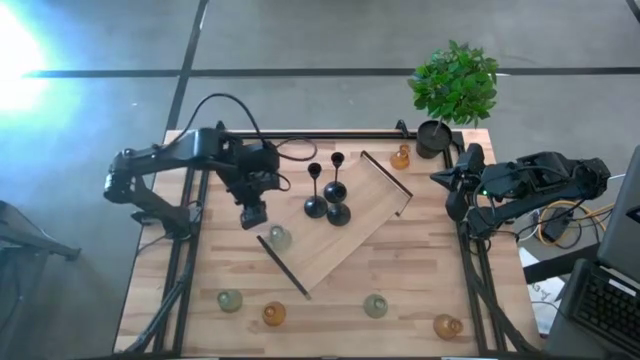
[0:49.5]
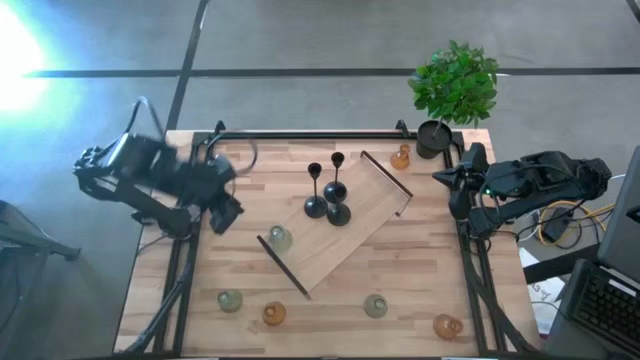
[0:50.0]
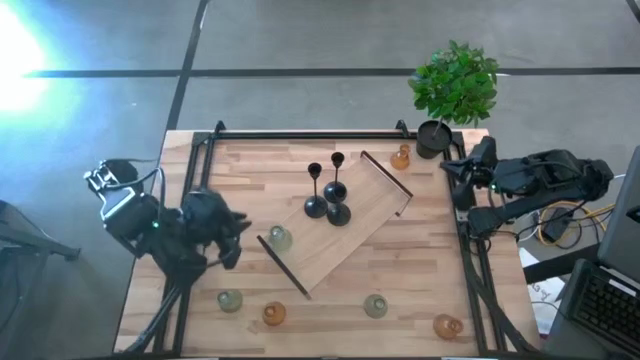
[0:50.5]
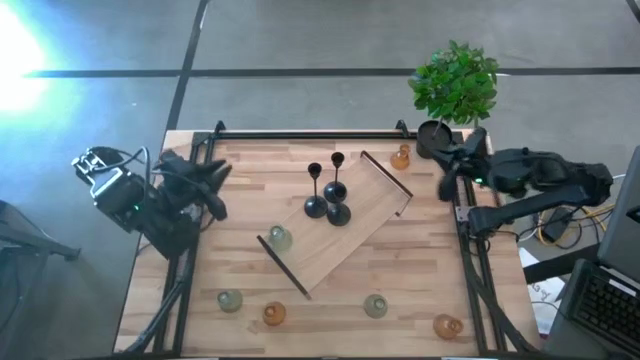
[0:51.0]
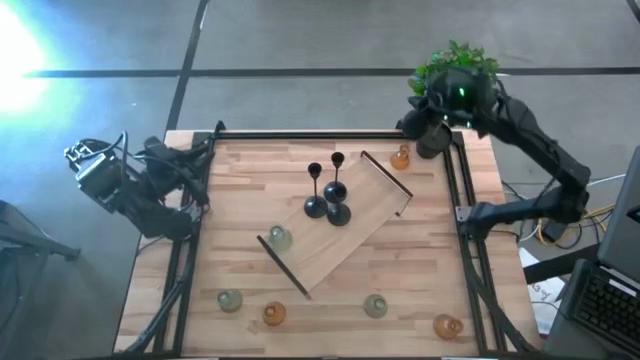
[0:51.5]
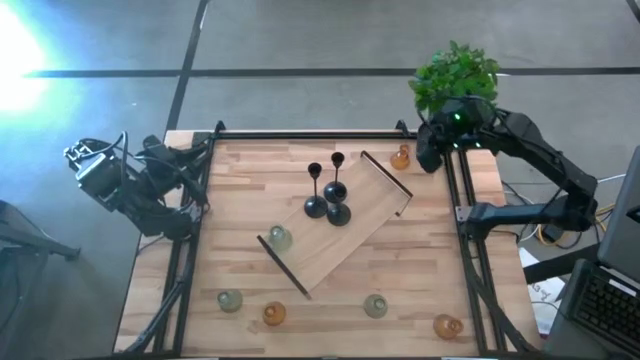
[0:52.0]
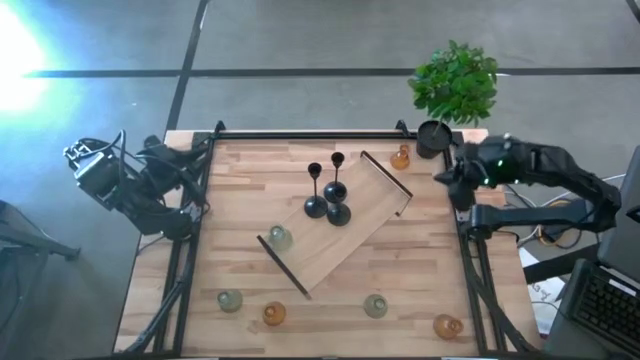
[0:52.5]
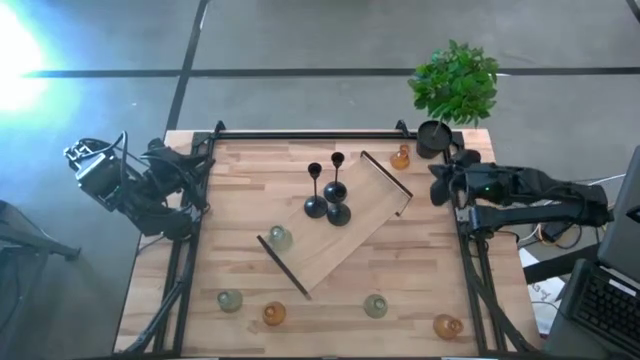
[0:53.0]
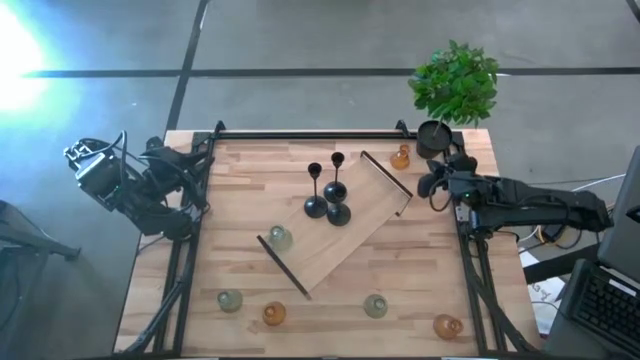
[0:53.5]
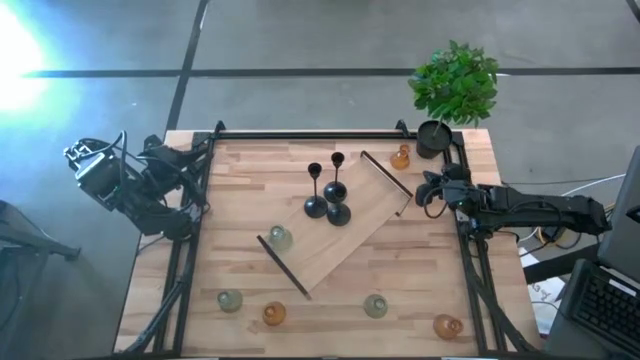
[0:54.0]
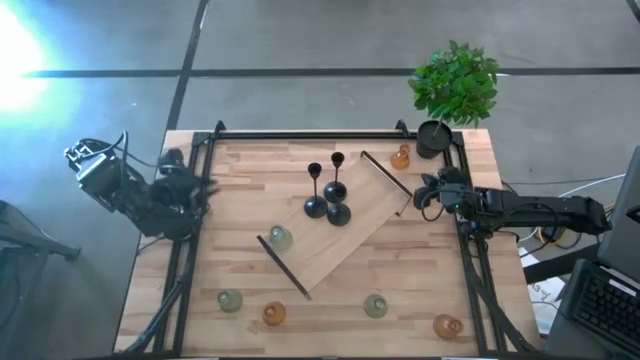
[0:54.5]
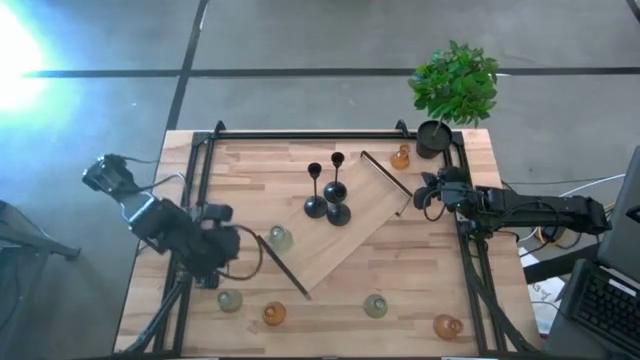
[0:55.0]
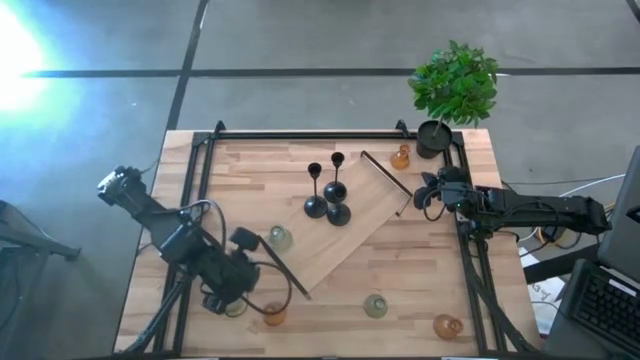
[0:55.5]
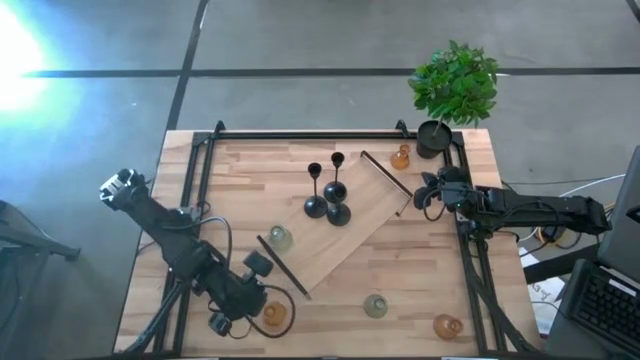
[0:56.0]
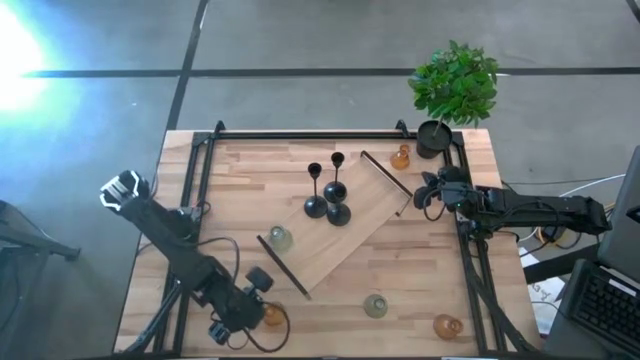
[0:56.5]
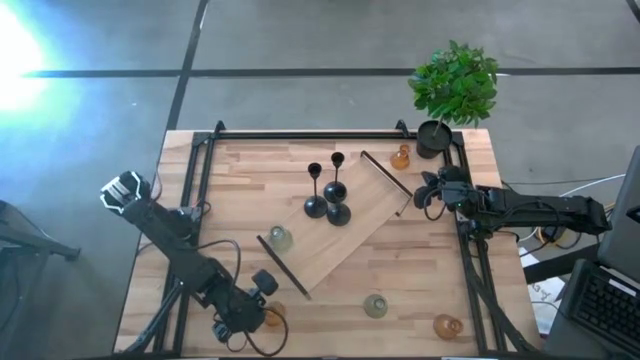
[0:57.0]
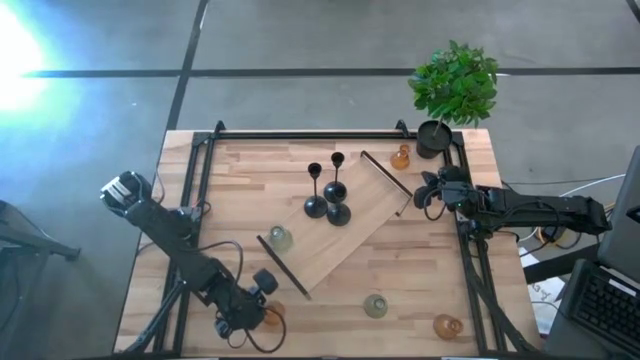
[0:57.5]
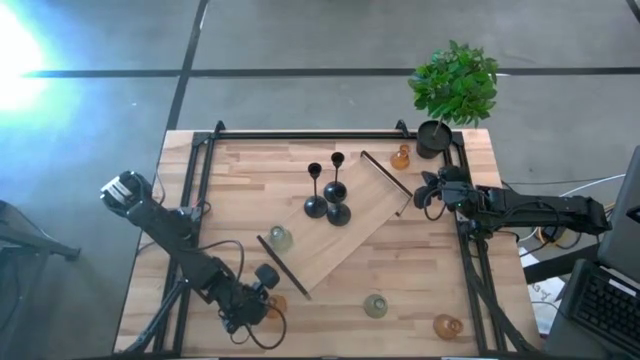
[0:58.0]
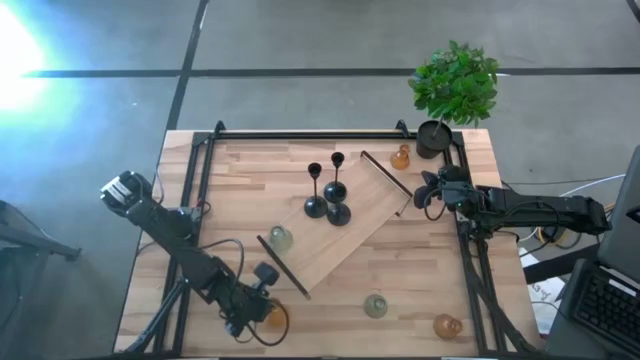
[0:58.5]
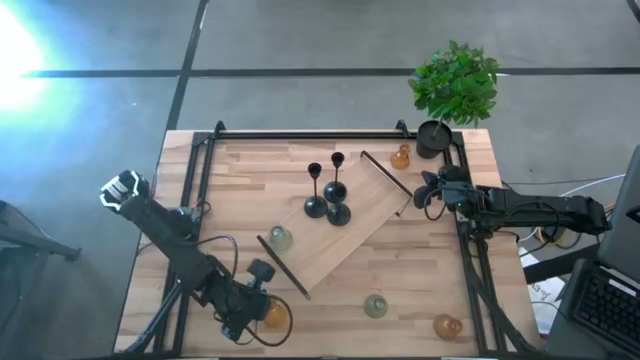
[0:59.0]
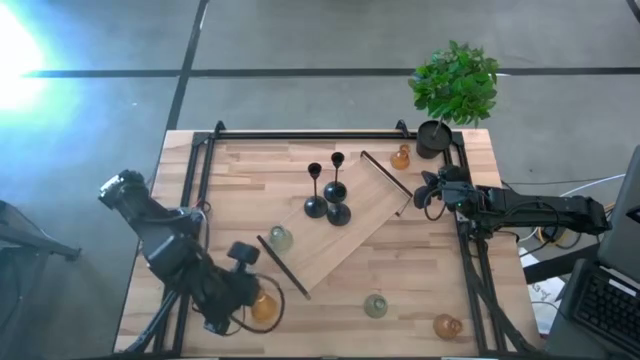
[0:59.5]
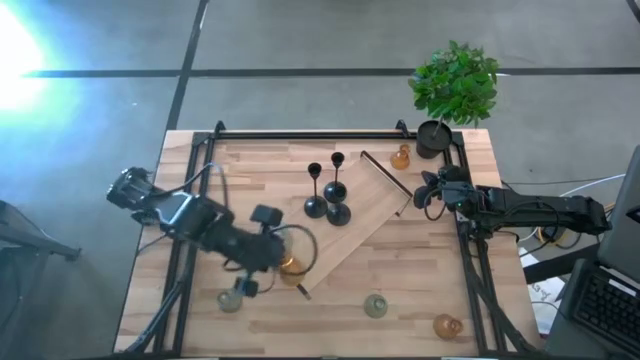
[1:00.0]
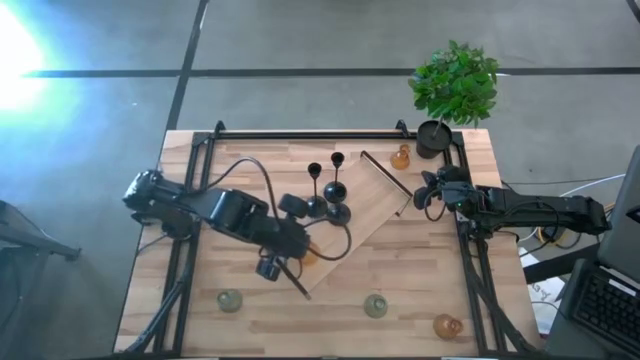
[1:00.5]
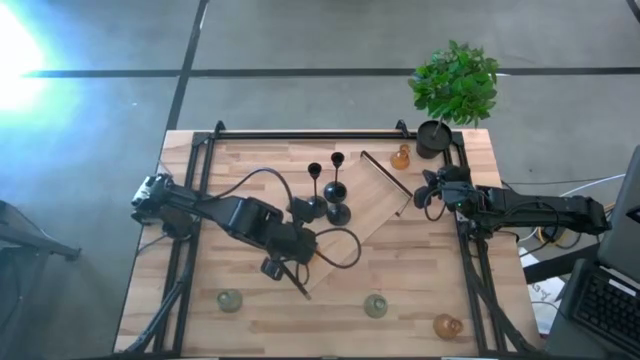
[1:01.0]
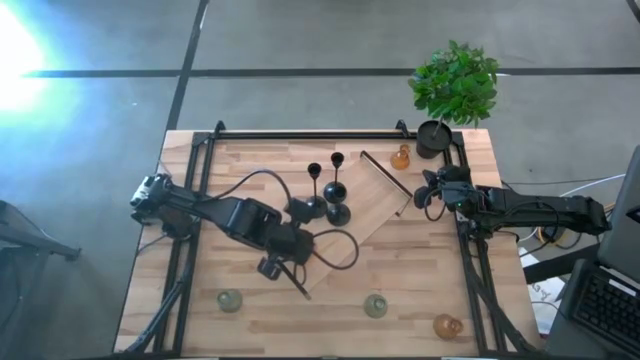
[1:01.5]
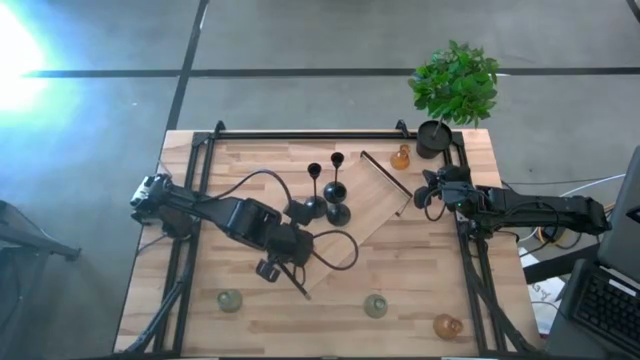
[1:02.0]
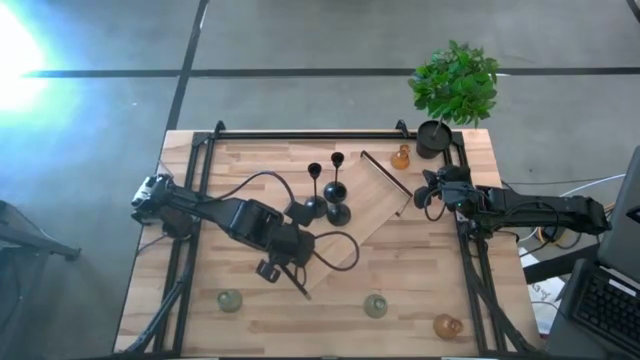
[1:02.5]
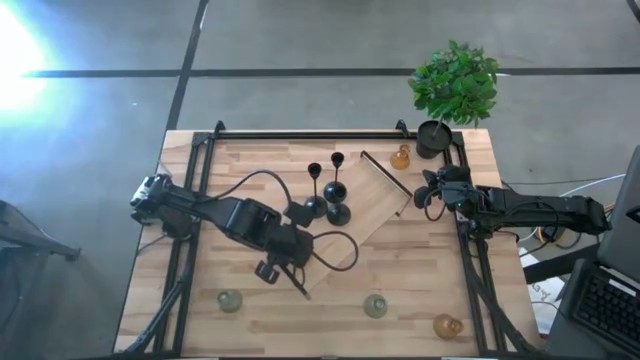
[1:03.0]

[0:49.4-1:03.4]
Task: Pick & Place candle stick holders
Put the bottom left yellow candle holder on the shelf

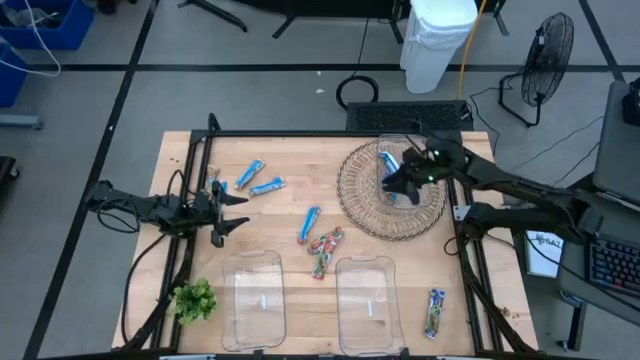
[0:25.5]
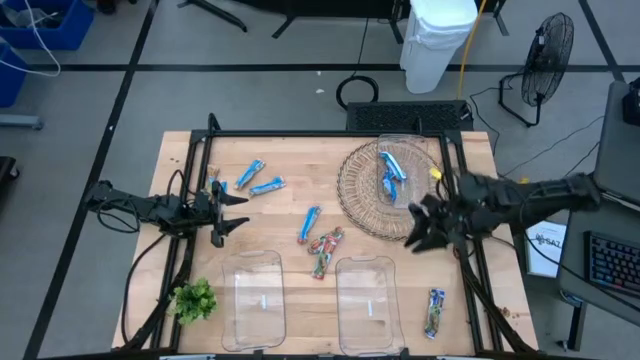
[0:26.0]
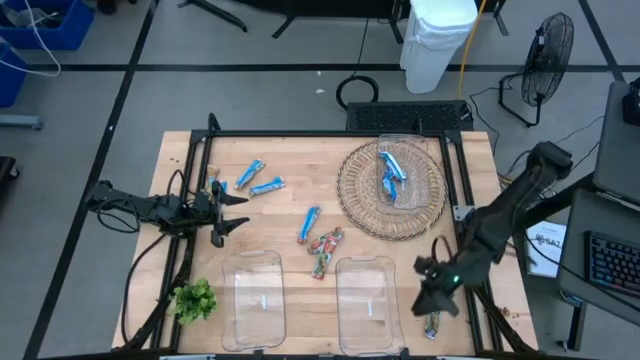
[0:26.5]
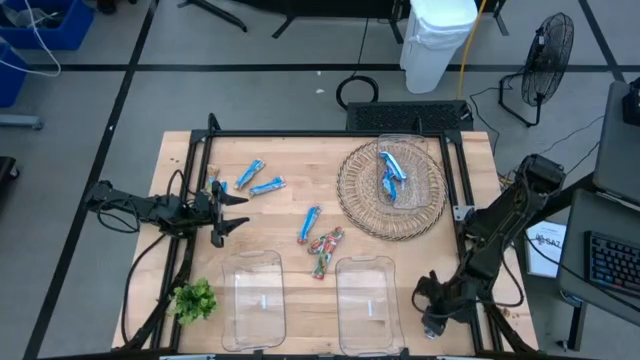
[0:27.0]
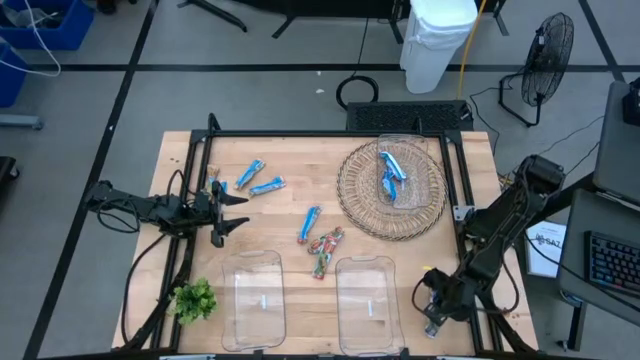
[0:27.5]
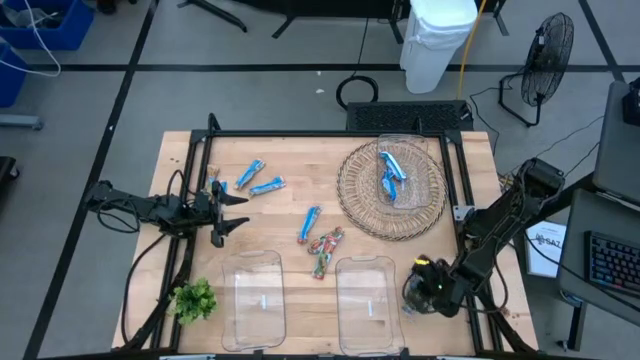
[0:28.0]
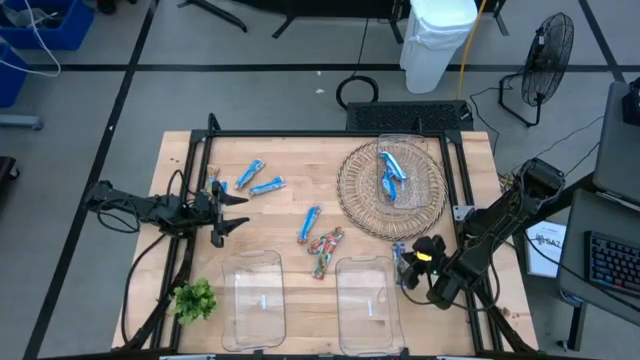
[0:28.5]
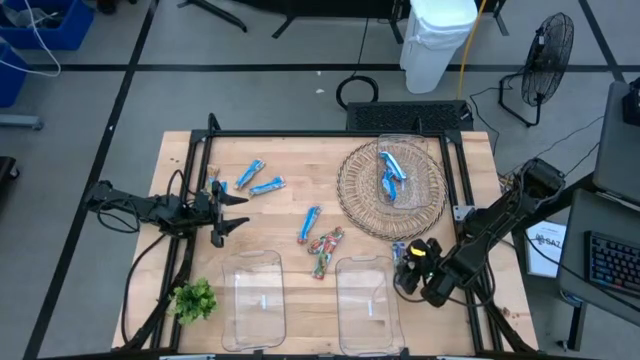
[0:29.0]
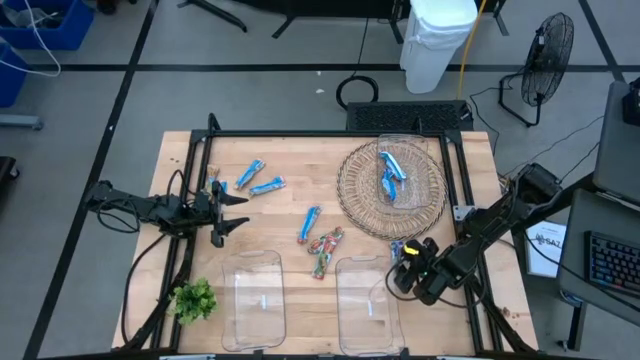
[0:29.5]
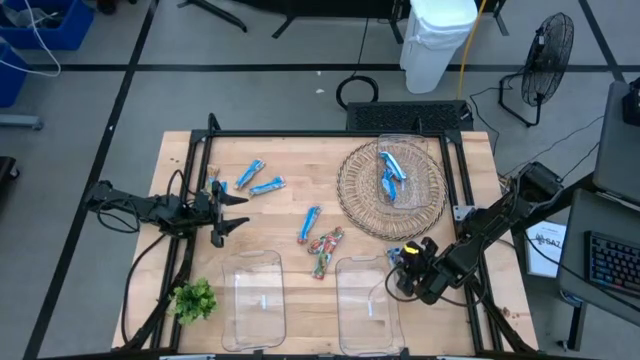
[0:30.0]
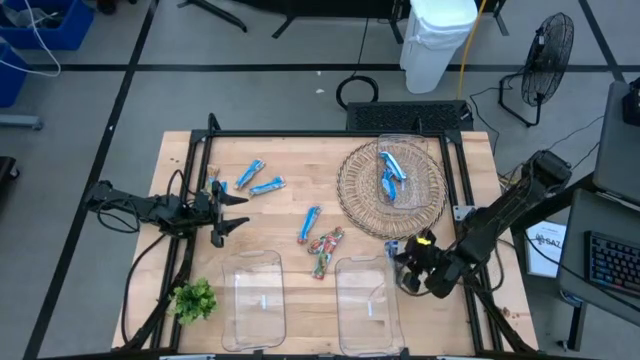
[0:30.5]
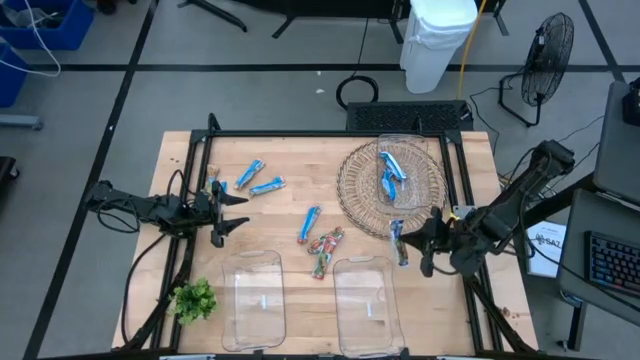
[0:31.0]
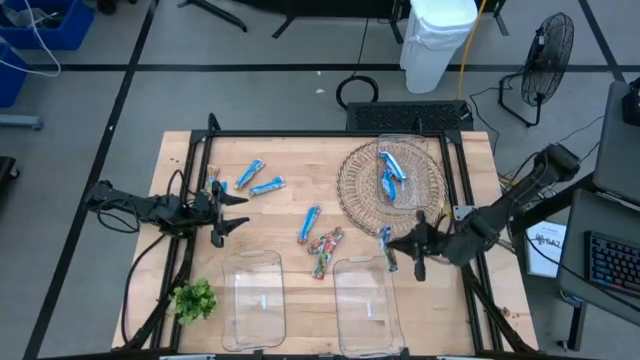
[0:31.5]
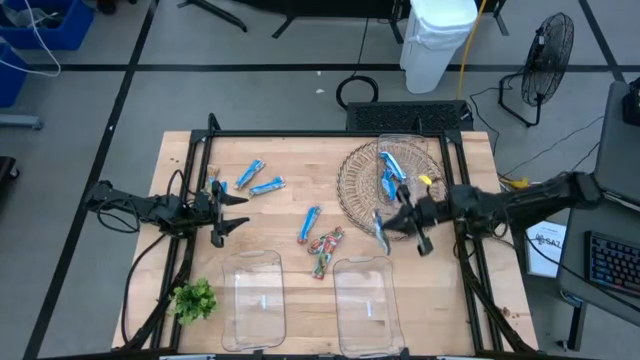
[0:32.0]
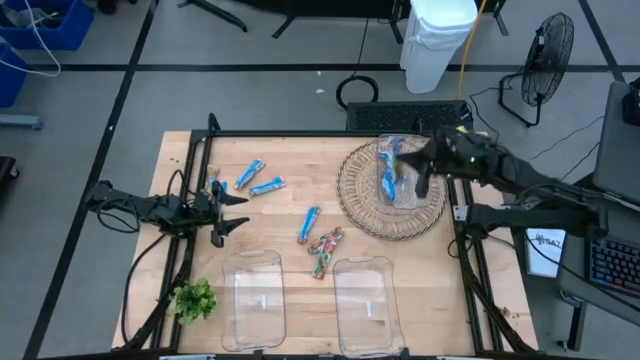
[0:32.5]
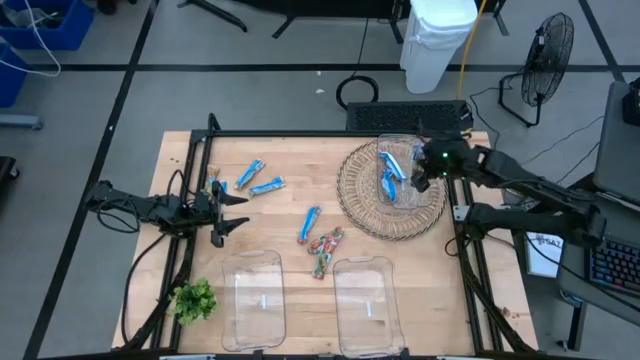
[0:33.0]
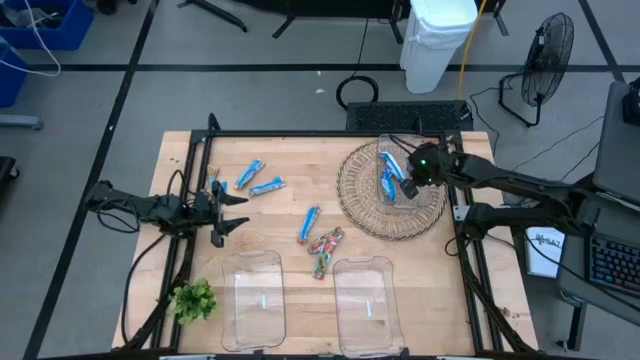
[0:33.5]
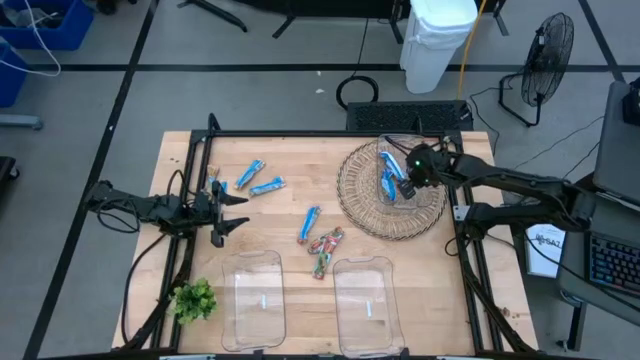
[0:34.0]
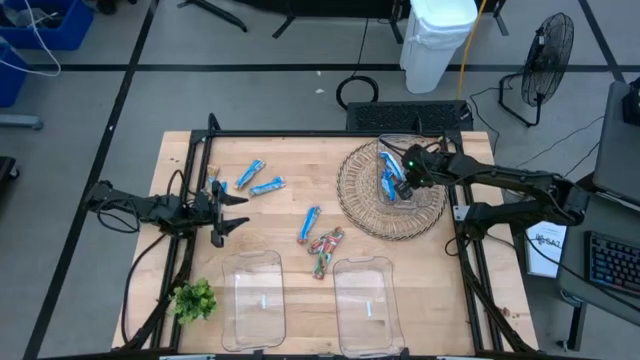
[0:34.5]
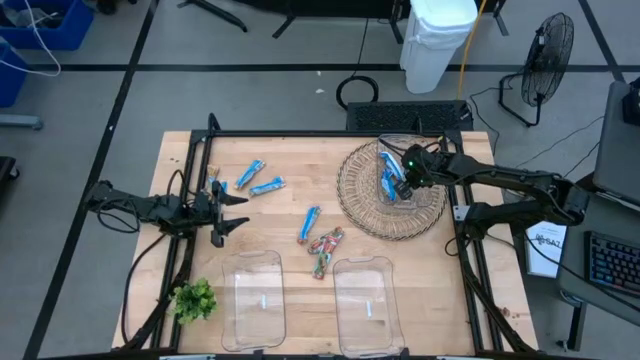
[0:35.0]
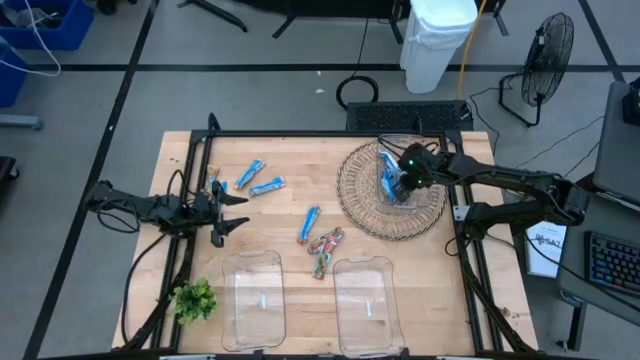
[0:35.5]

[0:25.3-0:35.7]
Task: Pick and place Granola Bars by type
Put the blue granola bar into the top transparent bin
